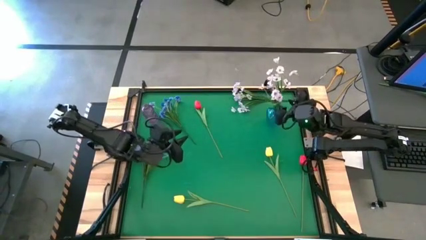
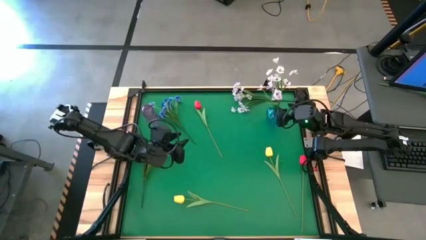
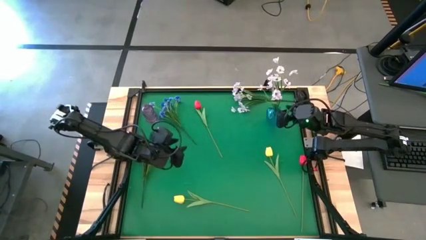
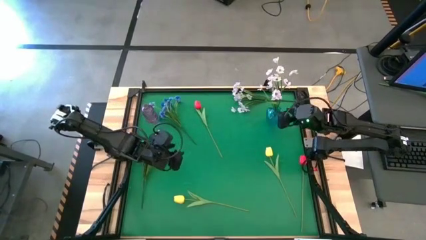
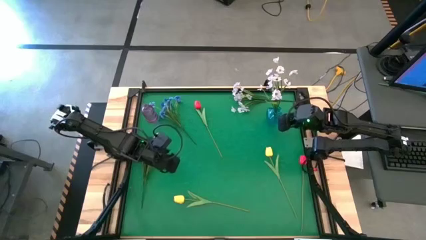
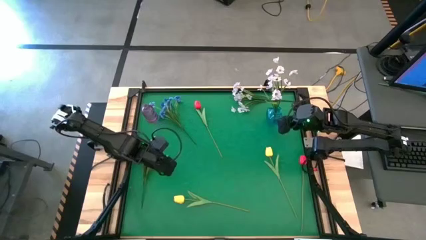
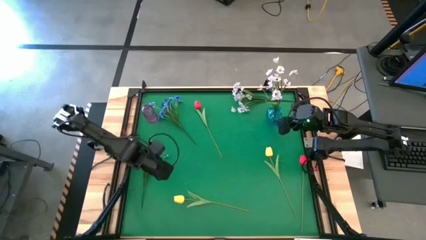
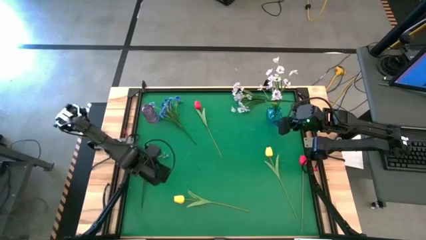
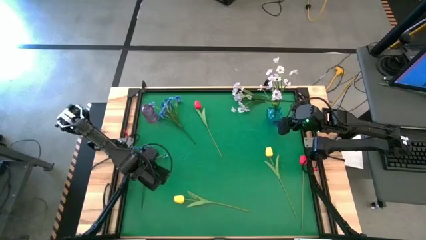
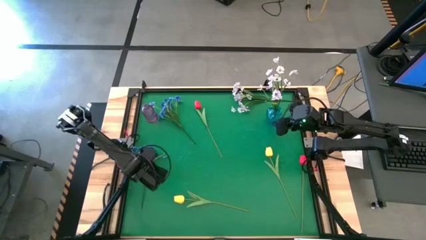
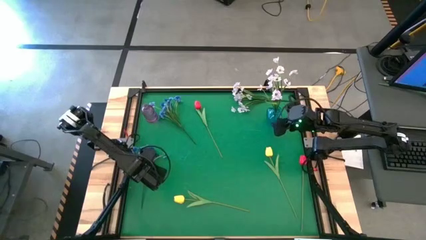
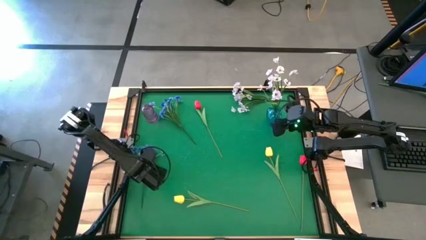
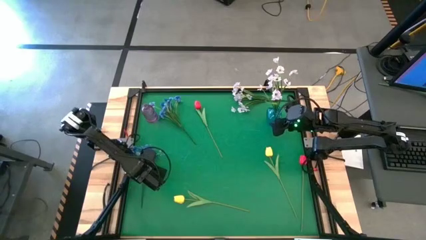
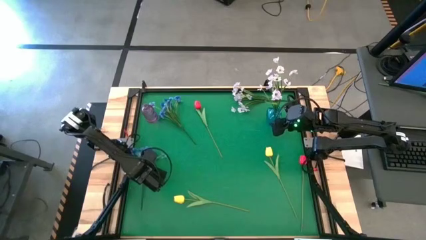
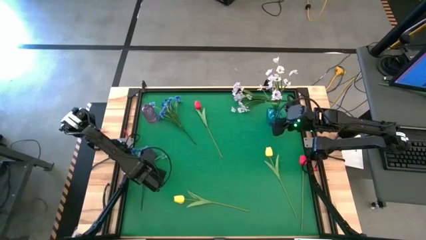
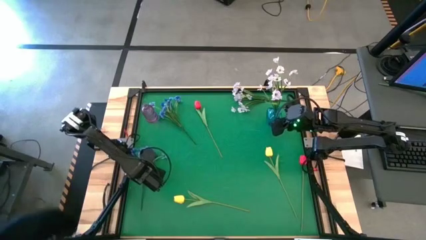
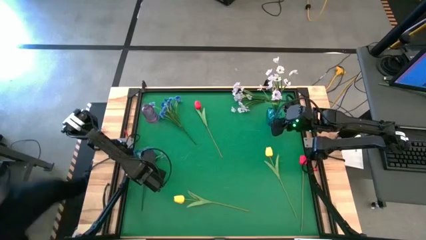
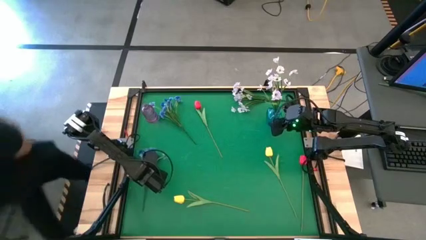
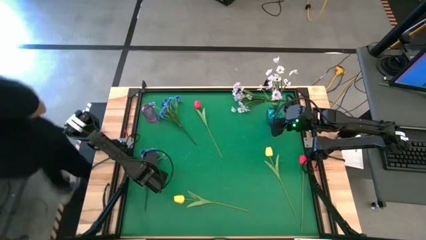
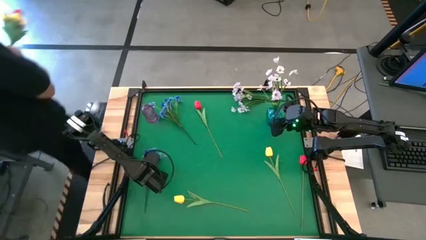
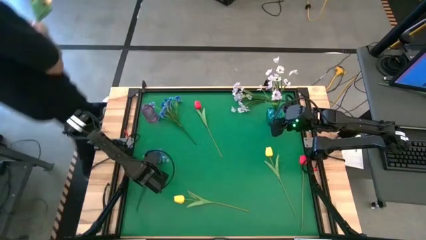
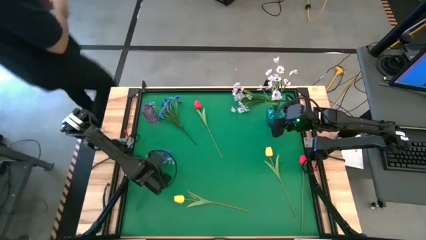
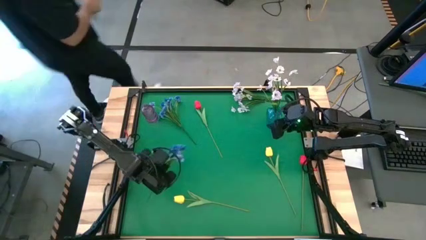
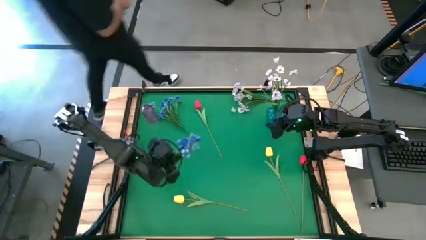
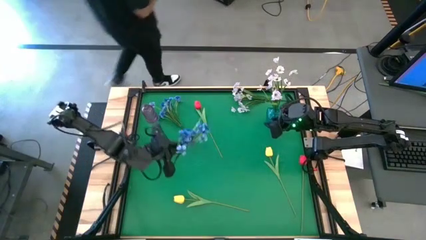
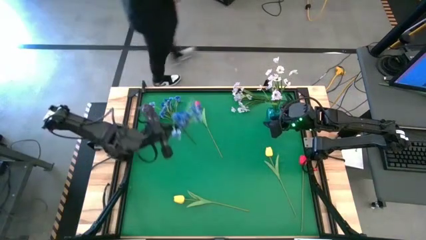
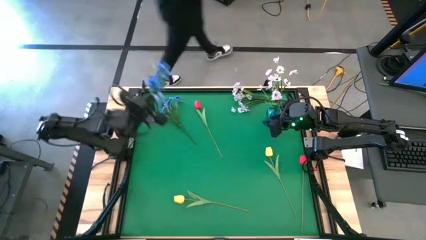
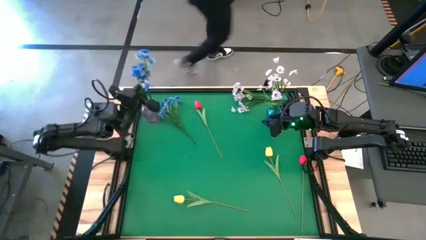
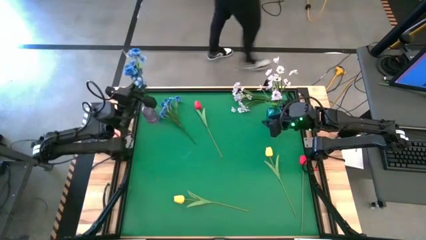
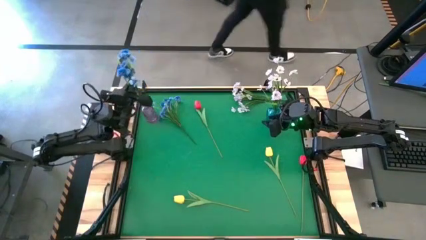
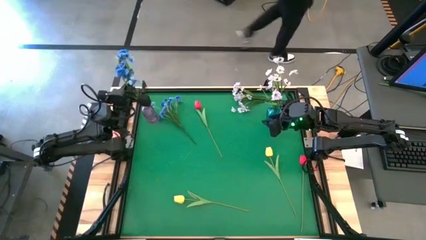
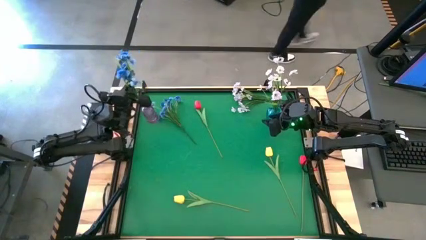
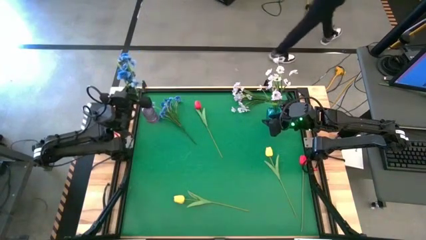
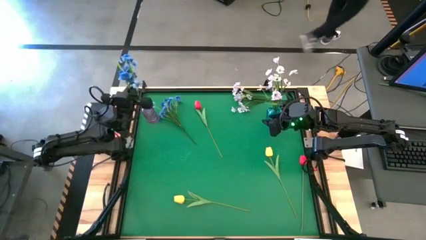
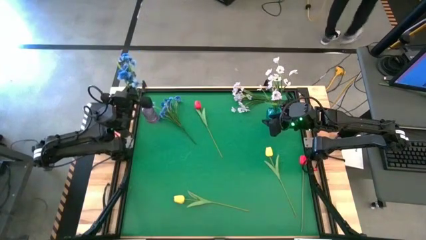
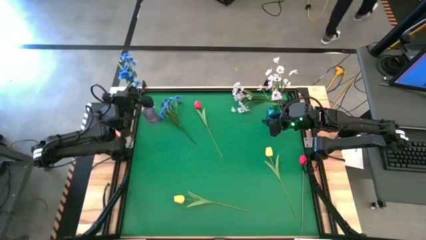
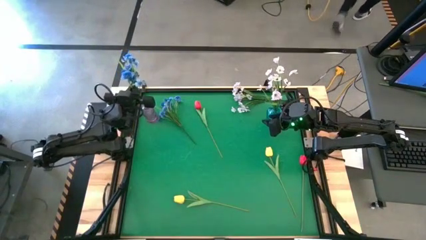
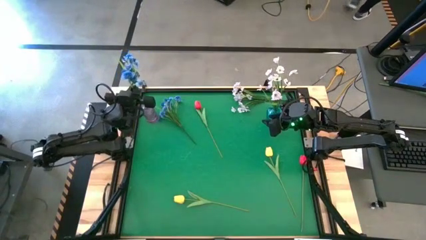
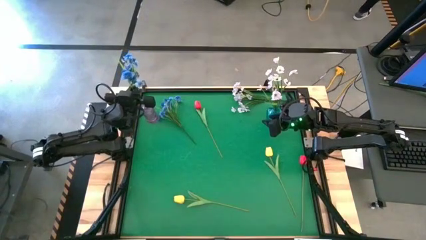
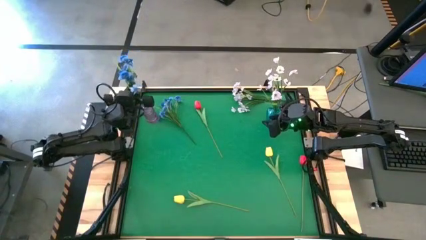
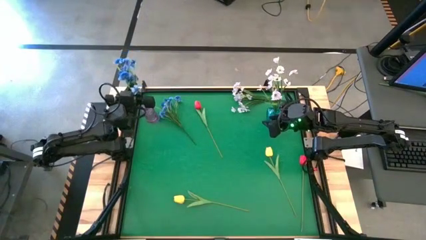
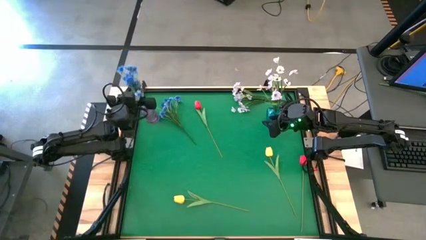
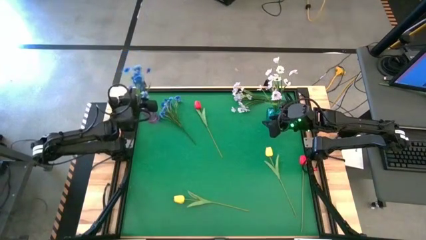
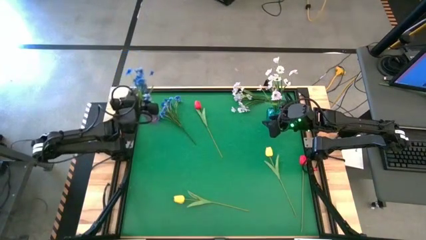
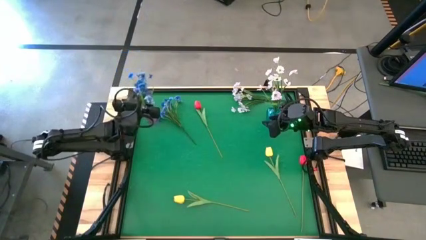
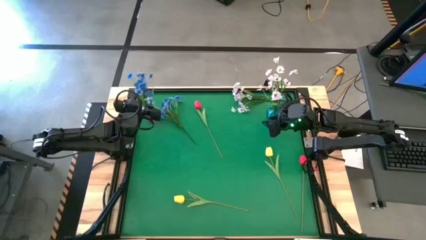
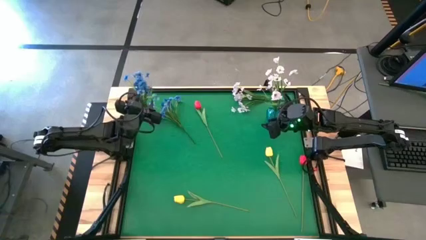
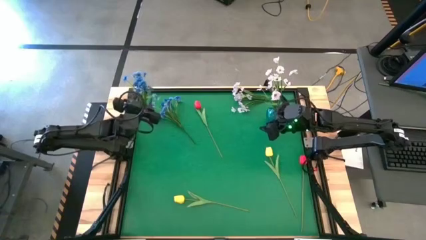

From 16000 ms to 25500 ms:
Task: Sort flowers into vase by color
Put the bottom blue flowers into the purple vase
